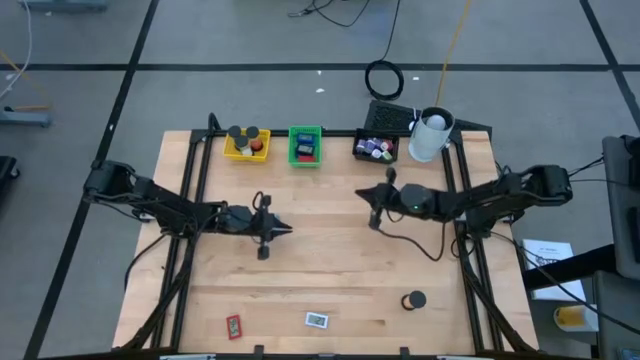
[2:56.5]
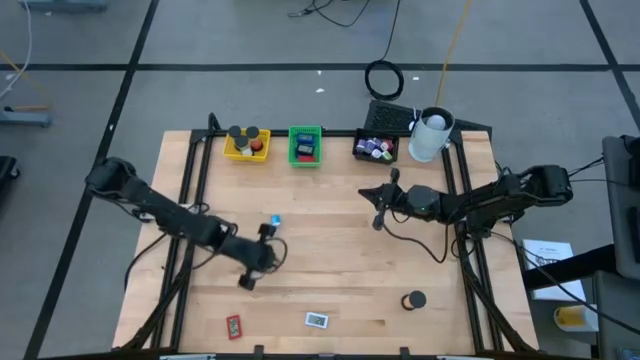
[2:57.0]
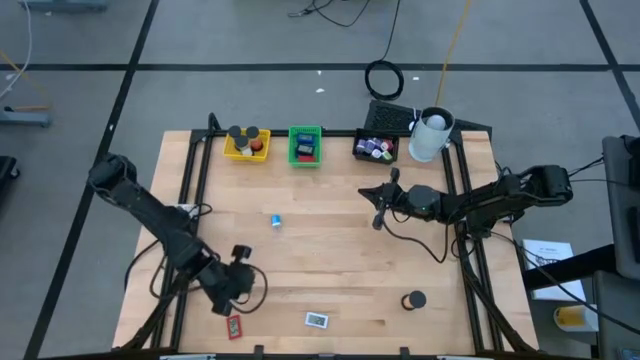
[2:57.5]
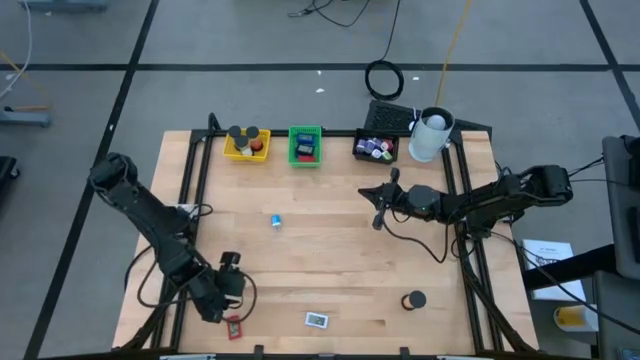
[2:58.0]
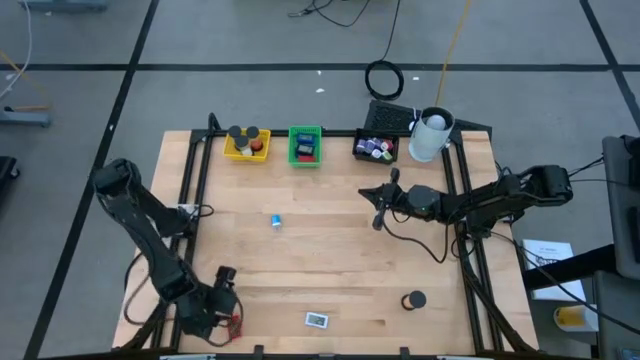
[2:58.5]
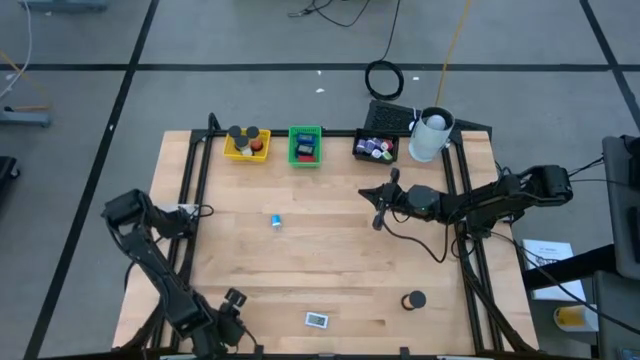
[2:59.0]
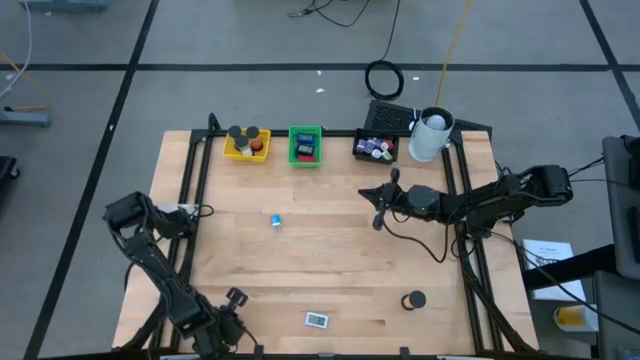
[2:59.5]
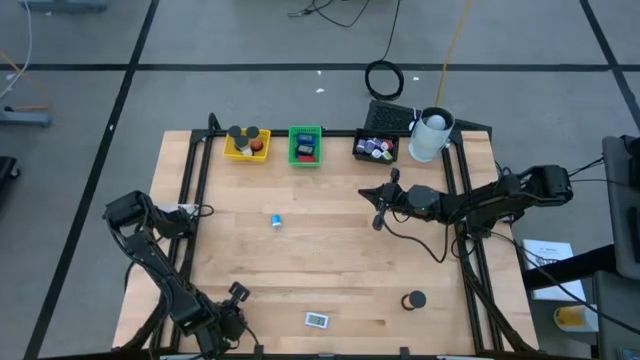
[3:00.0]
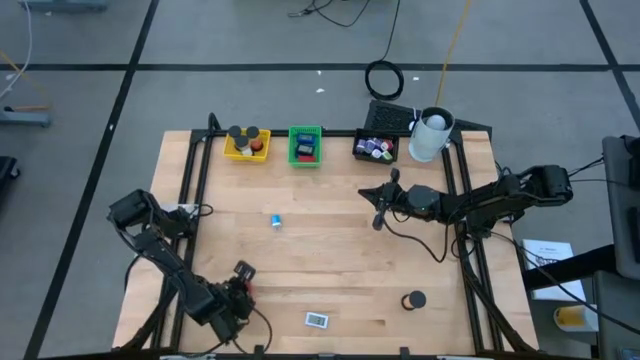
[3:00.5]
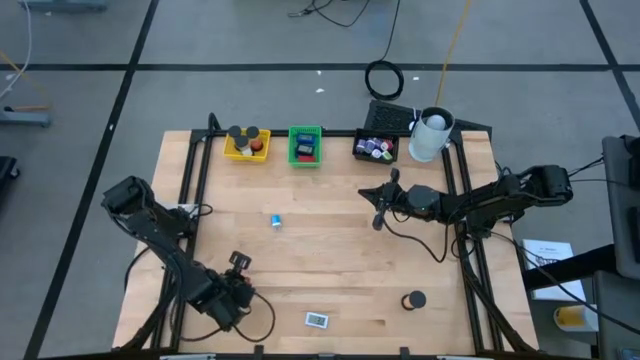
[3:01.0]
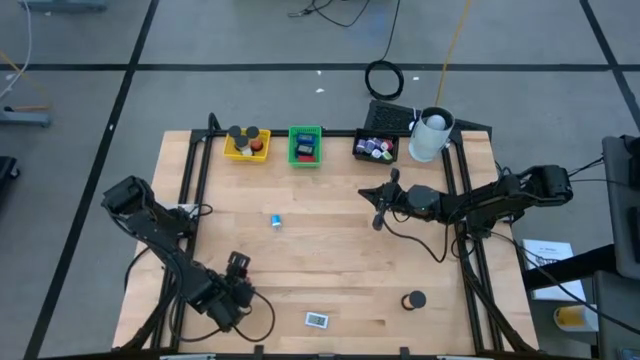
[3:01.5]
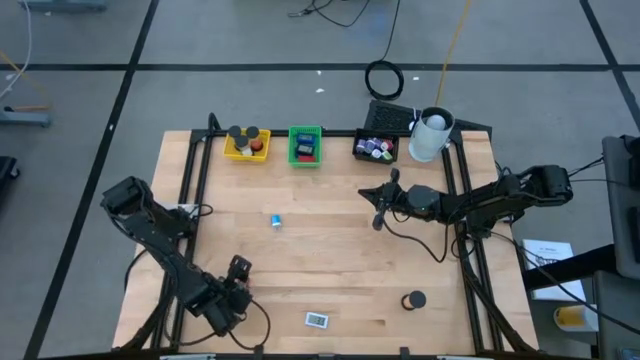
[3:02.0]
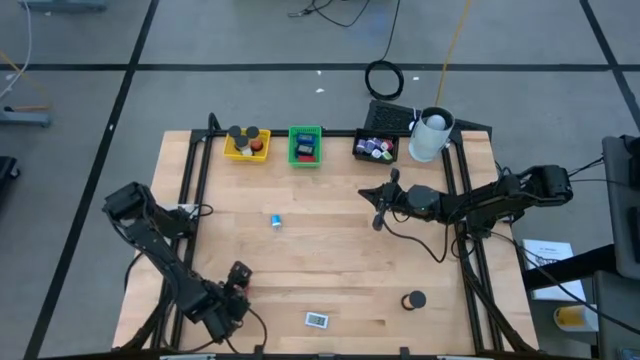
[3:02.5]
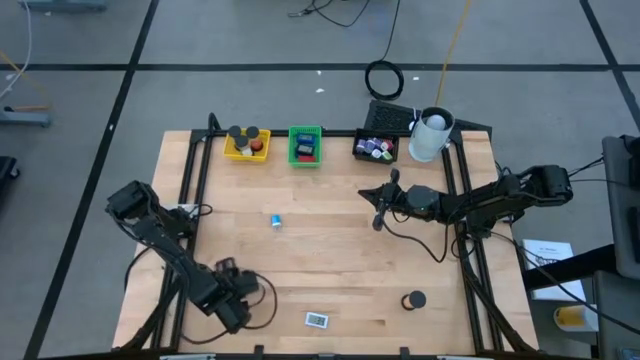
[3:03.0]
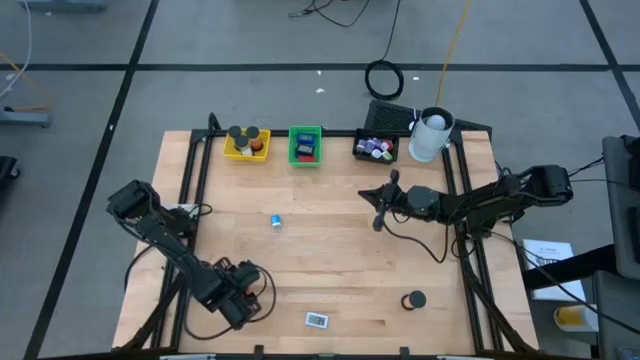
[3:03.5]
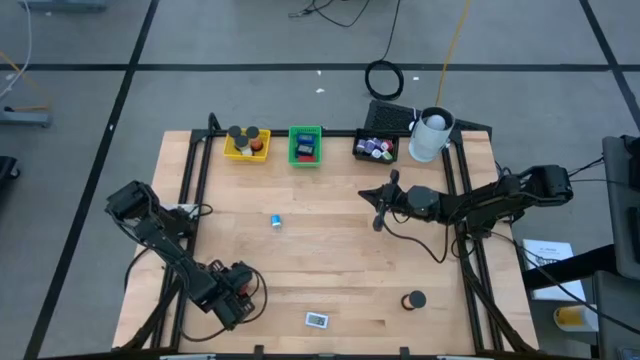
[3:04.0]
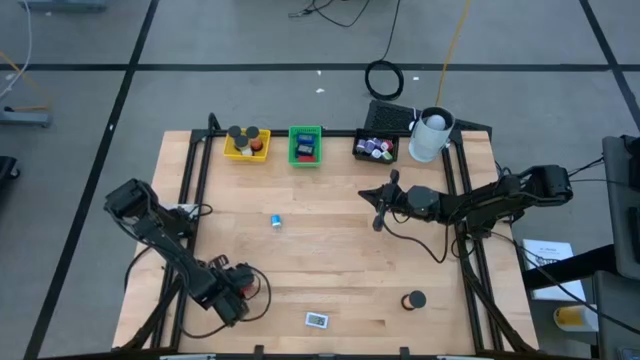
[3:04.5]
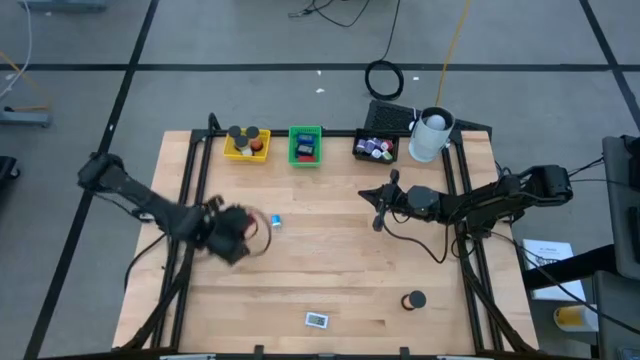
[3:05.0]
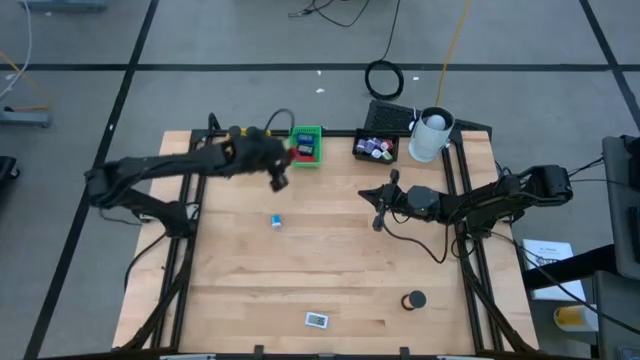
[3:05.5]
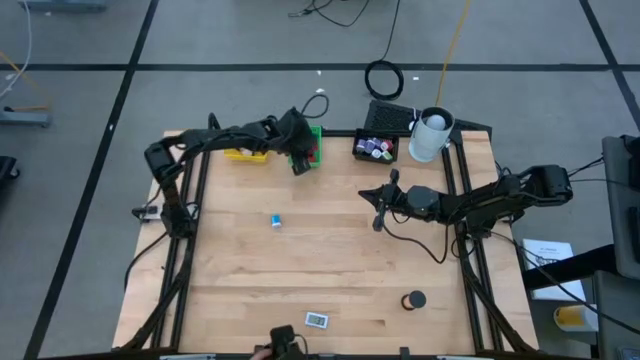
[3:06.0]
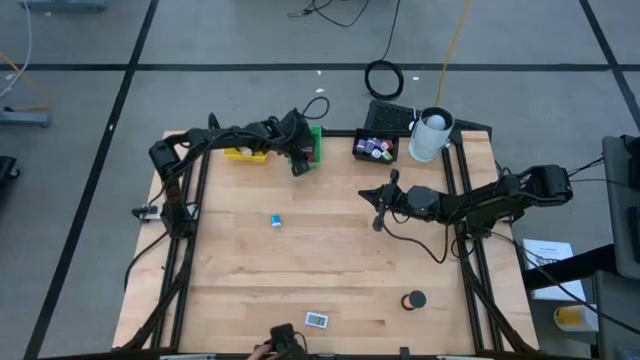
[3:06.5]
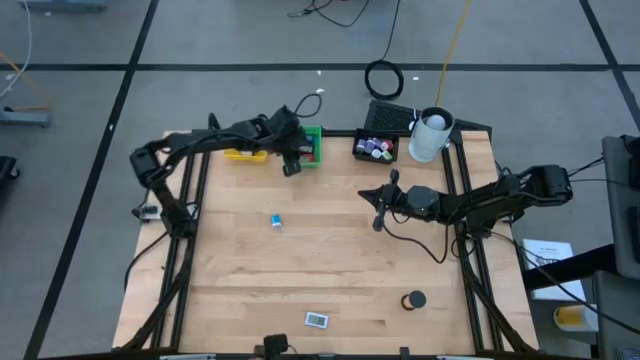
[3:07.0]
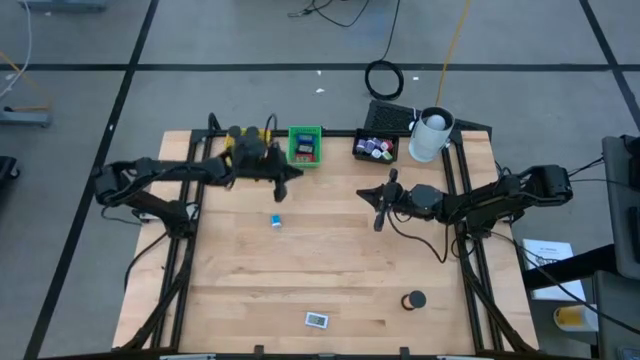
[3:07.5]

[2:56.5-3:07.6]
Task: Pick & Place Office items
Put the red digital timer in the green bin

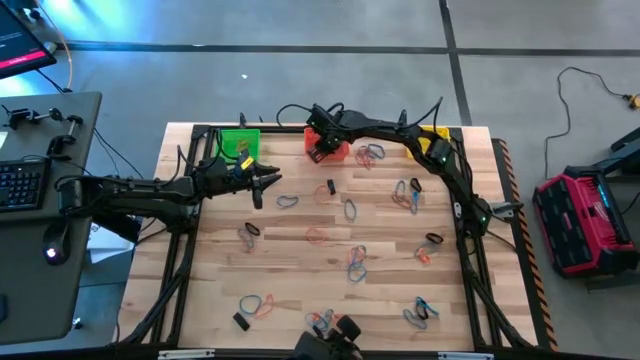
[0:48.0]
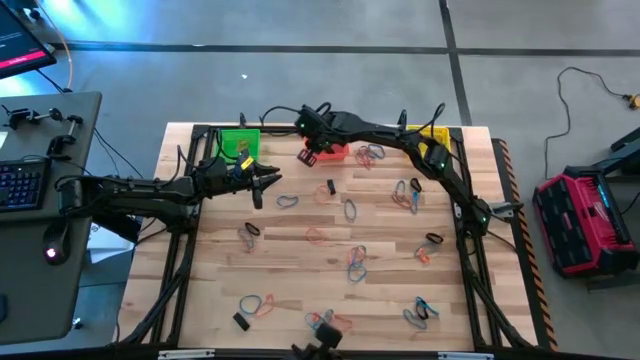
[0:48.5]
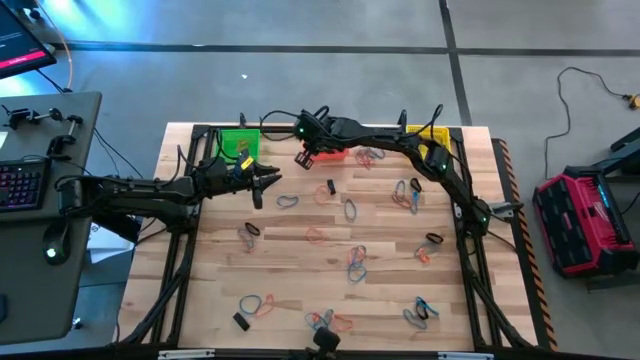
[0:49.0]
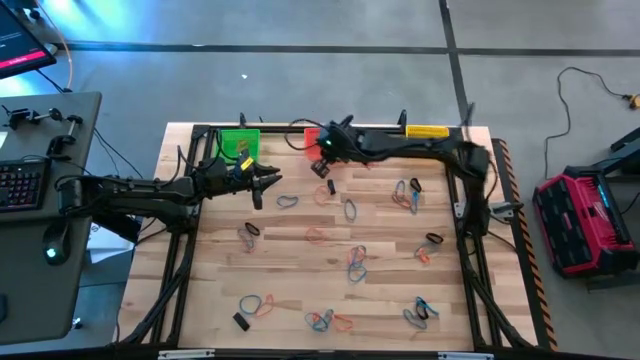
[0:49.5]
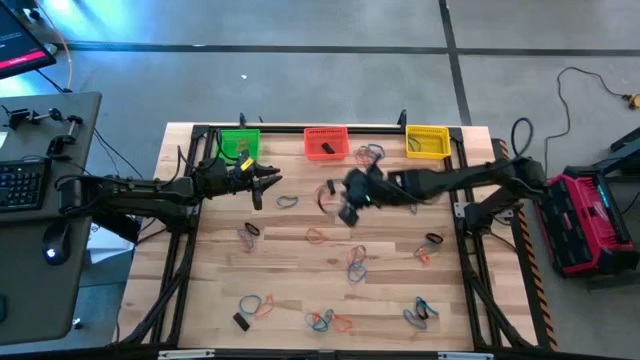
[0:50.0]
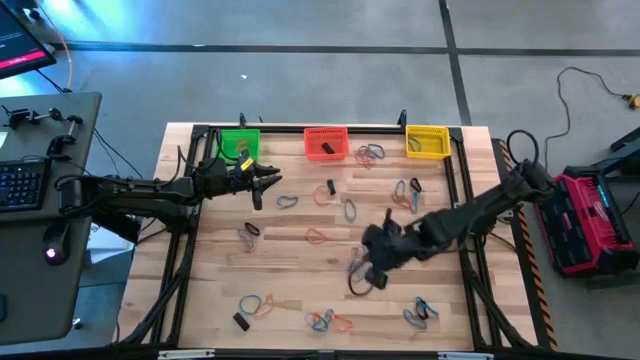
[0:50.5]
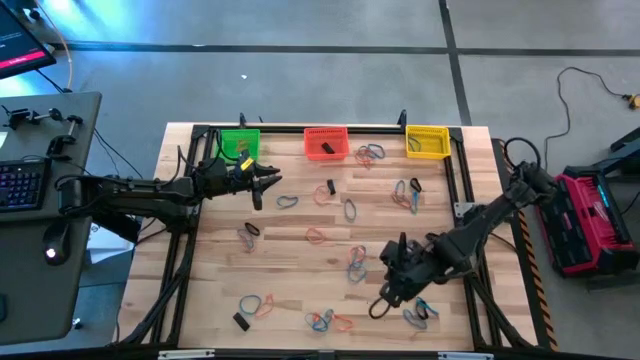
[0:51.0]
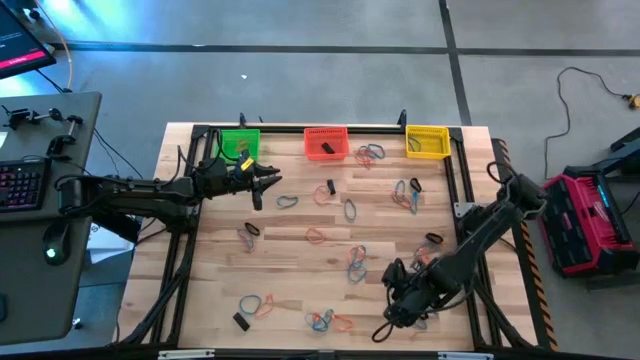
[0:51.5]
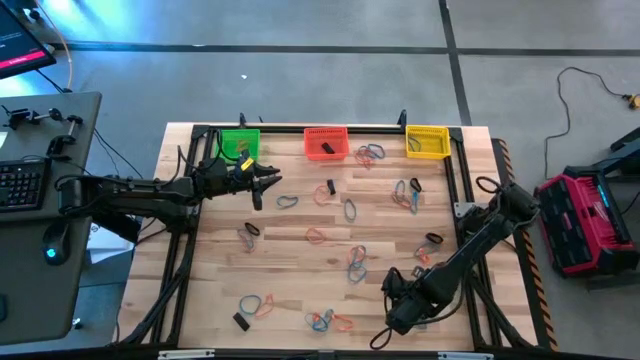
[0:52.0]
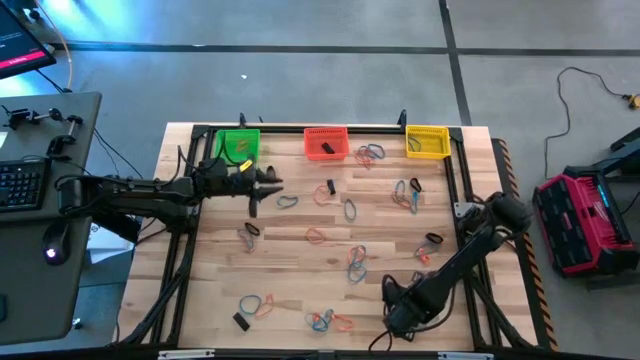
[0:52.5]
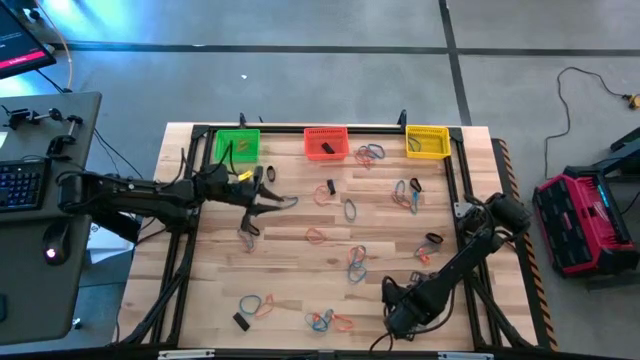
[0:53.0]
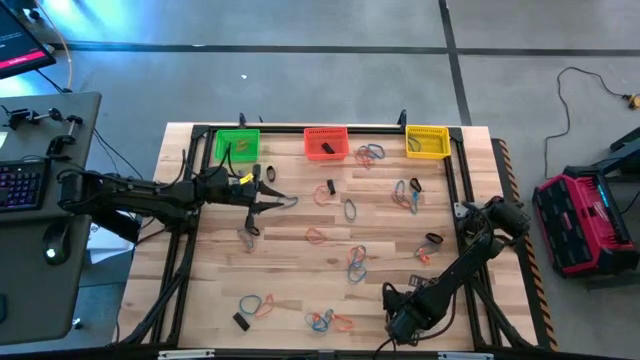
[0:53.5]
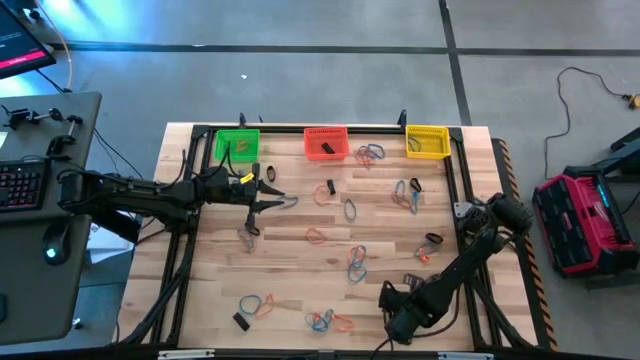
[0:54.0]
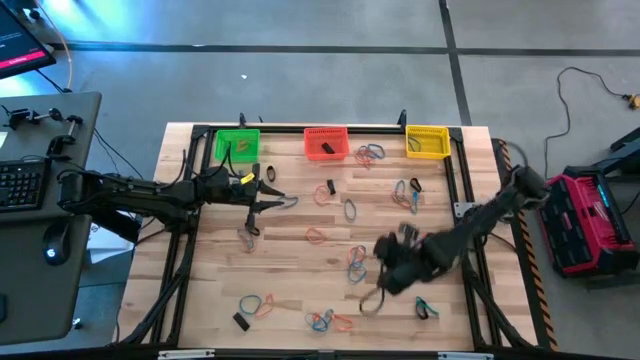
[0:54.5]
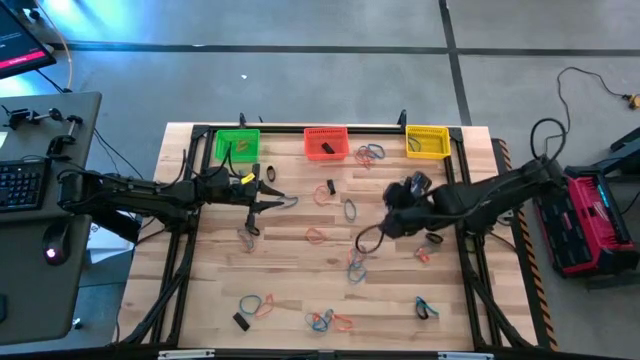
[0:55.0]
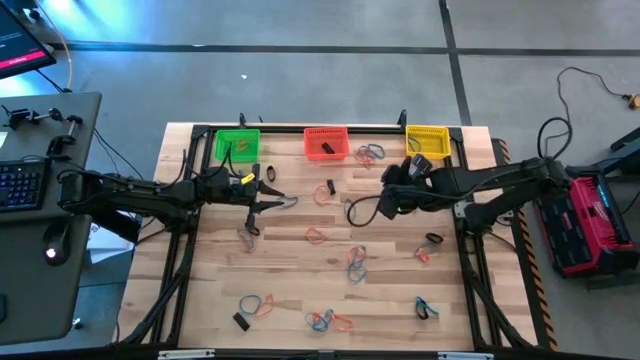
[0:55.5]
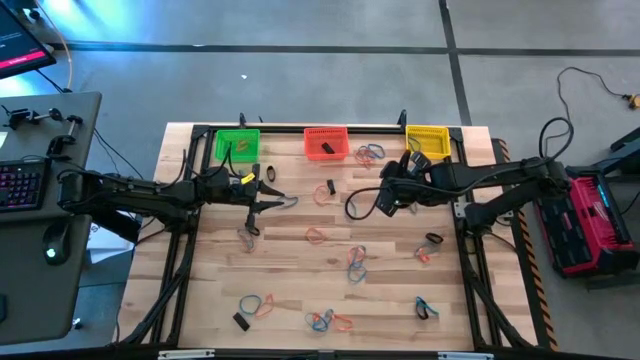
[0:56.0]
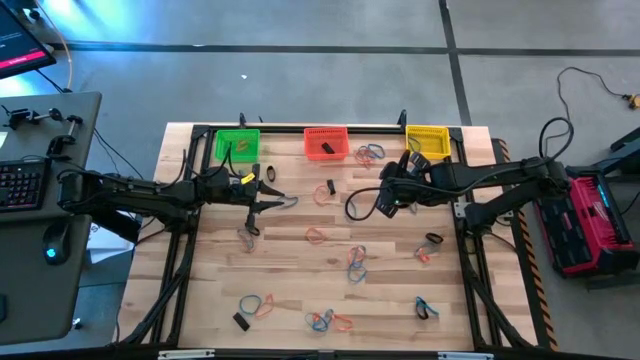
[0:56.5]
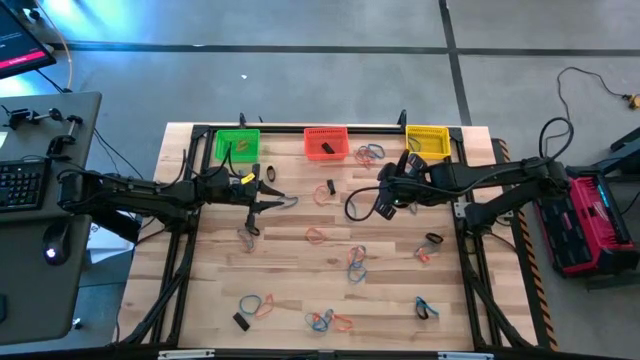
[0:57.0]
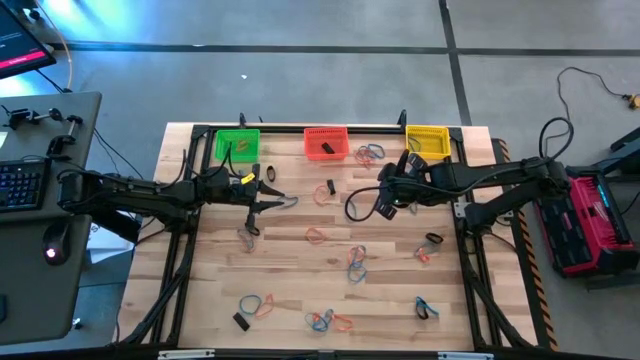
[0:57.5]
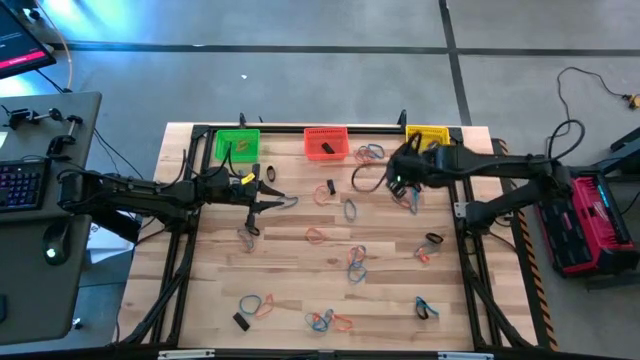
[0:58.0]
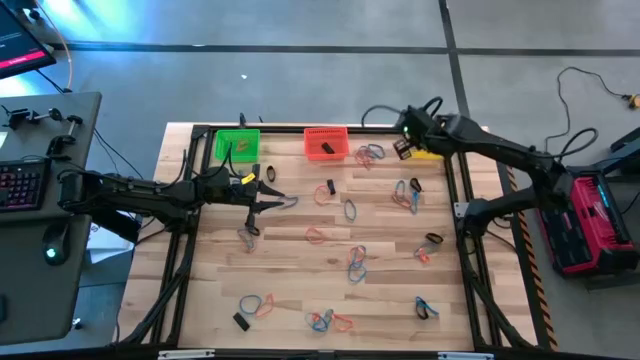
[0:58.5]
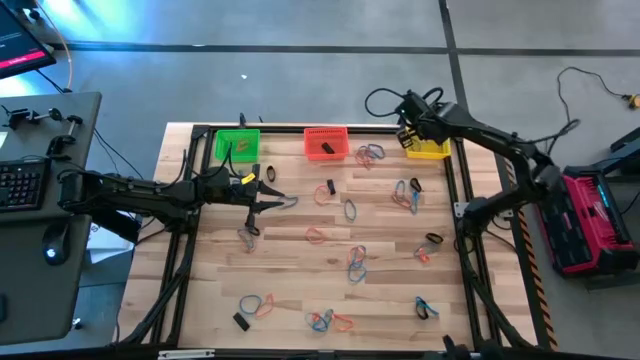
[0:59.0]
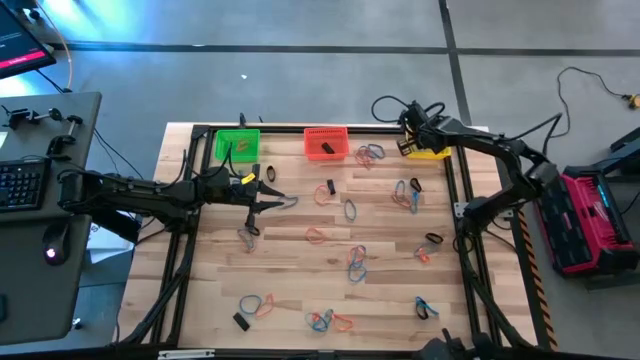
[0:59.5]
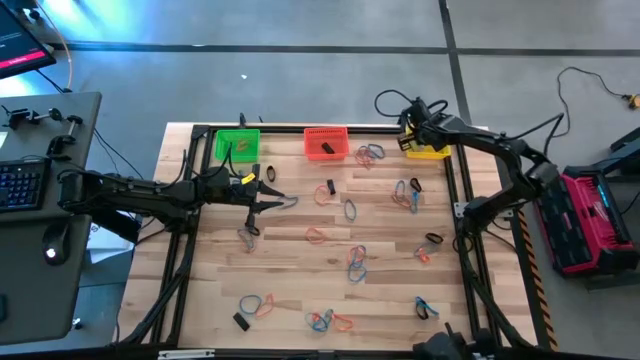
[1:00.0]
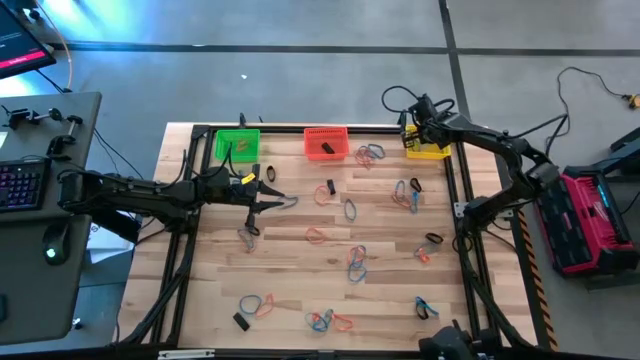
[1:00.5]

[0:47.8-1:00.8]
Task: Sort rubber bands into baskets
Put the blue rubber band into the yellow bin
